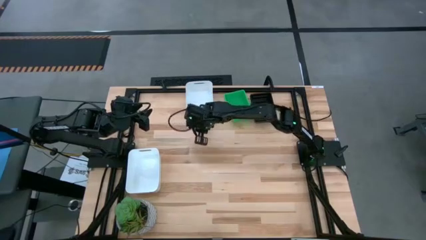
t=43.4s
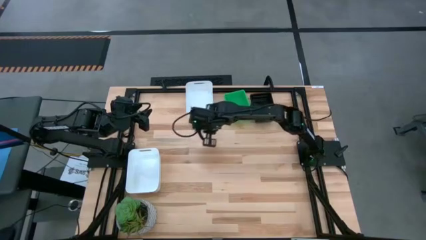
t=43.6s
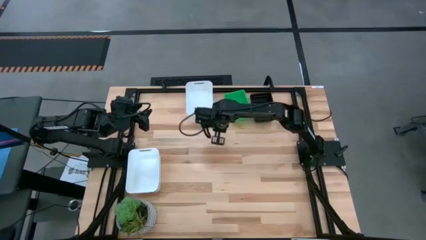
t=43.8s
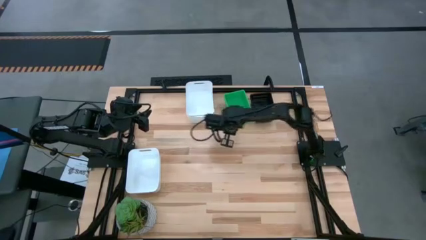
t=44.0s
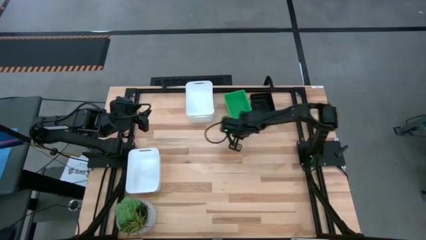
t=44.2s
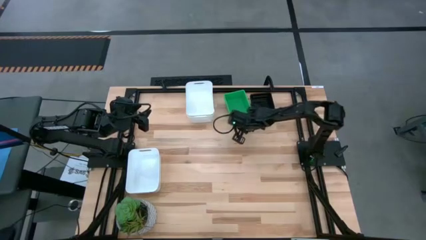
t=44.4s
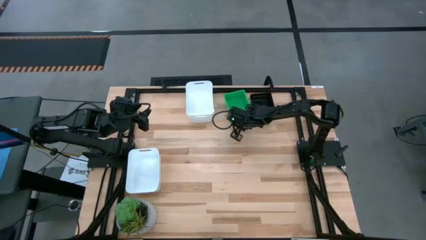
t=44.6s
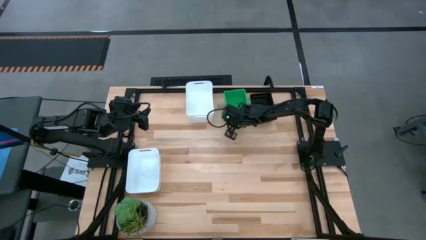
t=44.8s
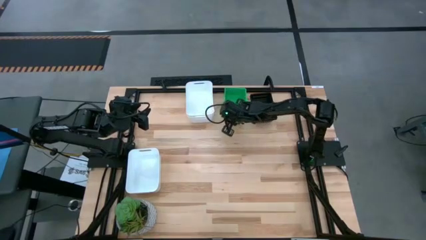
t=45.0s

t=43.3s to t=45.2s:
Adjust the green stacked bins

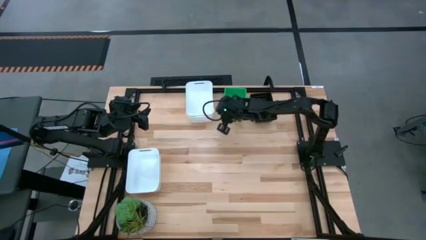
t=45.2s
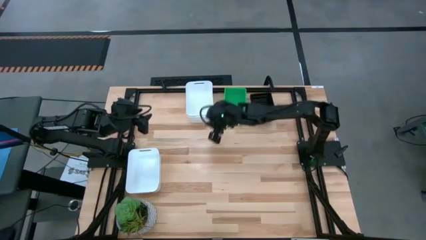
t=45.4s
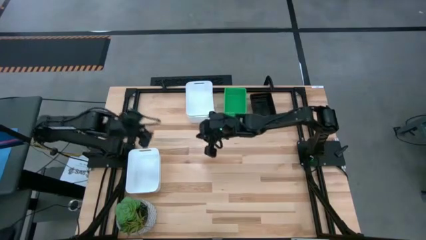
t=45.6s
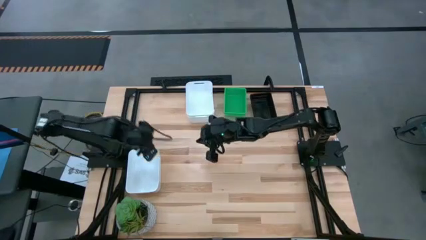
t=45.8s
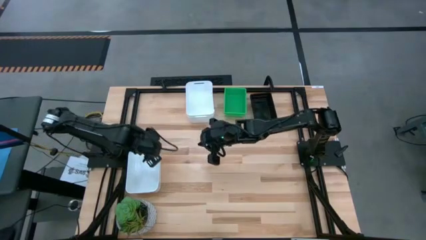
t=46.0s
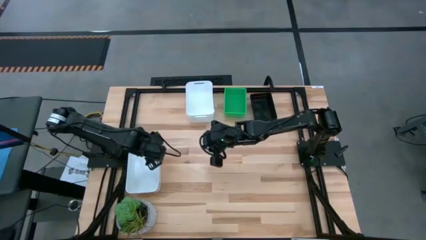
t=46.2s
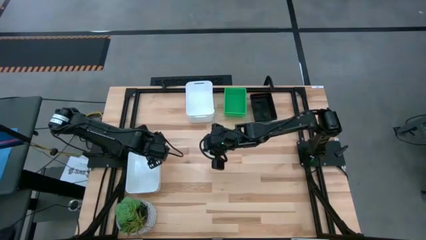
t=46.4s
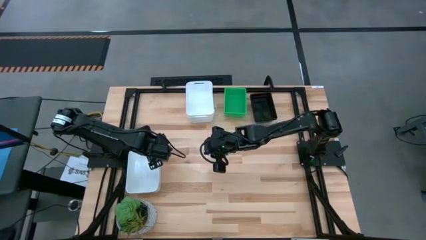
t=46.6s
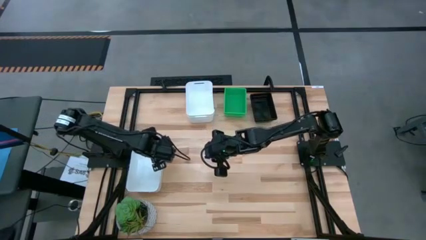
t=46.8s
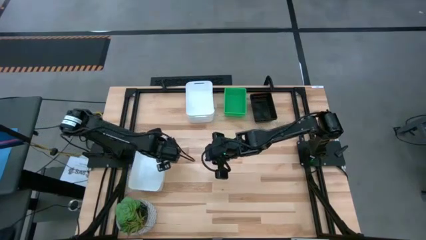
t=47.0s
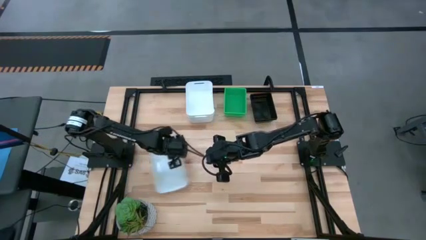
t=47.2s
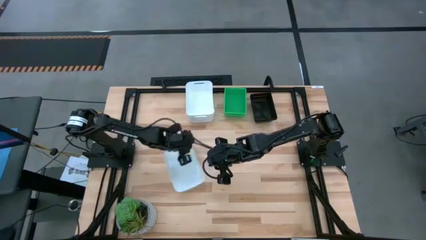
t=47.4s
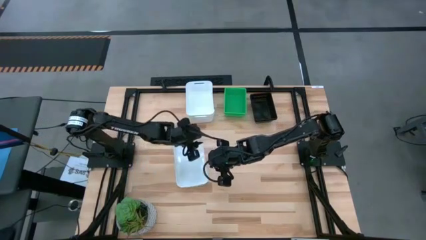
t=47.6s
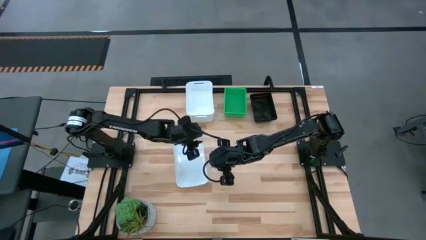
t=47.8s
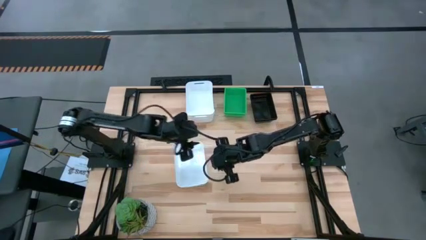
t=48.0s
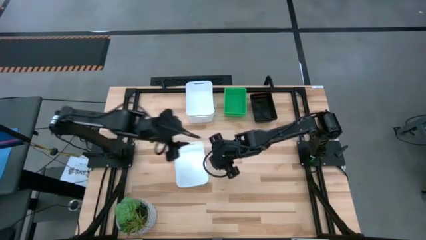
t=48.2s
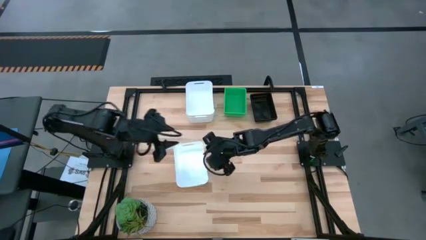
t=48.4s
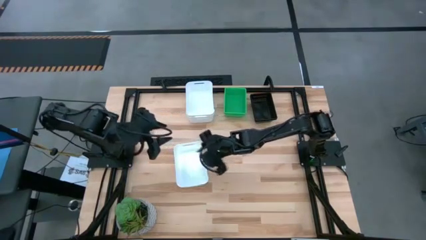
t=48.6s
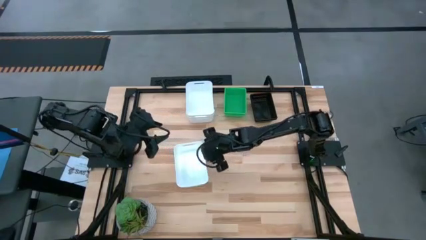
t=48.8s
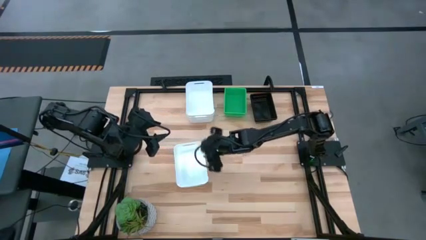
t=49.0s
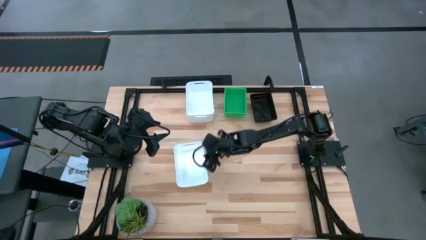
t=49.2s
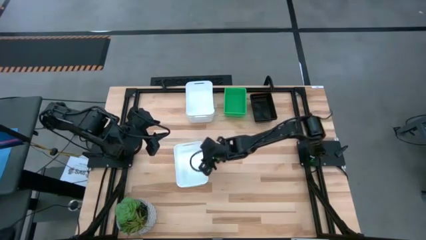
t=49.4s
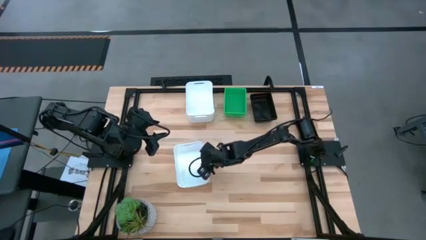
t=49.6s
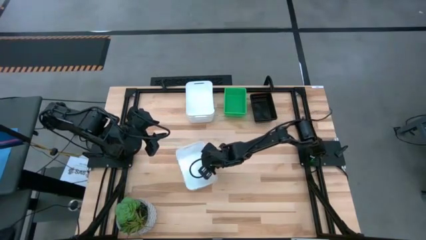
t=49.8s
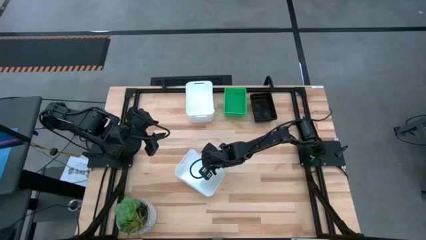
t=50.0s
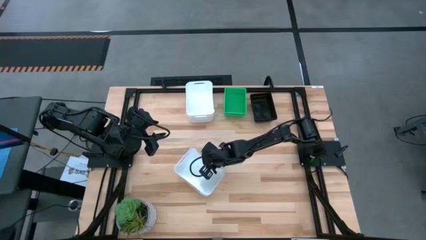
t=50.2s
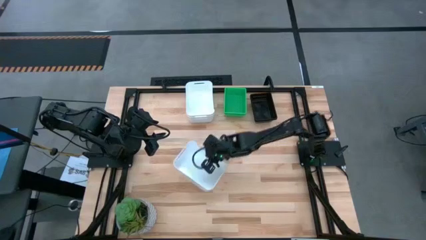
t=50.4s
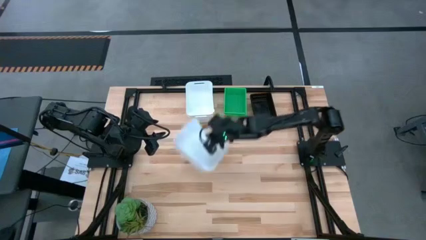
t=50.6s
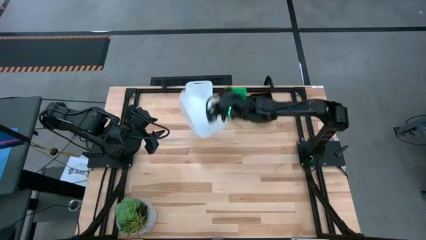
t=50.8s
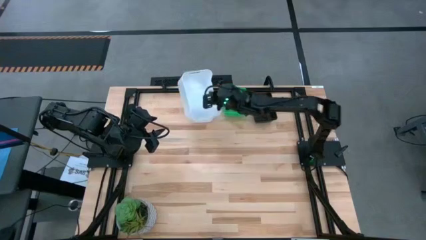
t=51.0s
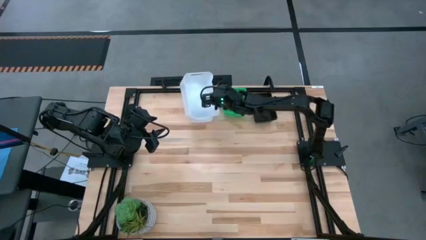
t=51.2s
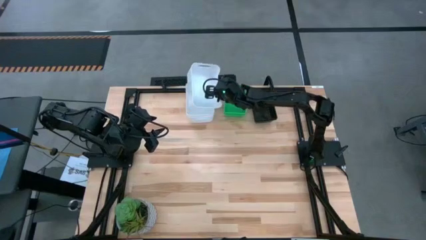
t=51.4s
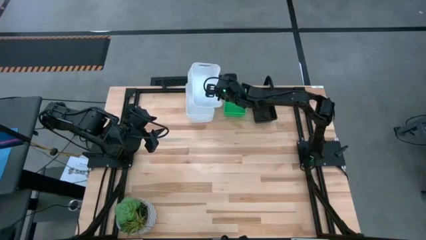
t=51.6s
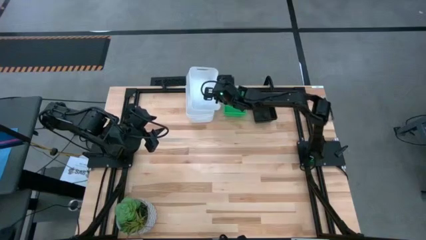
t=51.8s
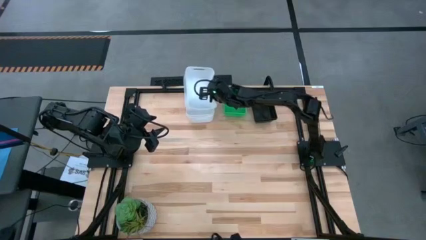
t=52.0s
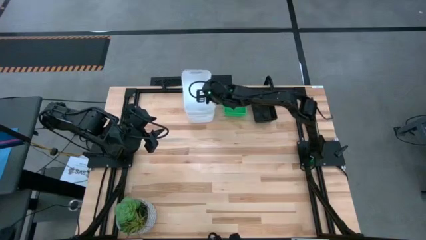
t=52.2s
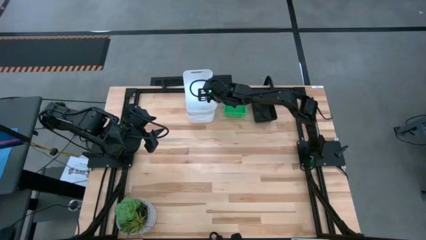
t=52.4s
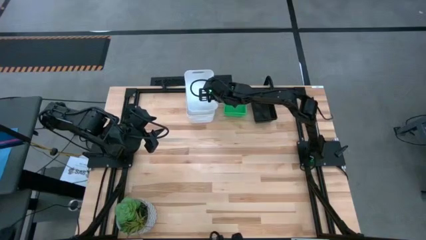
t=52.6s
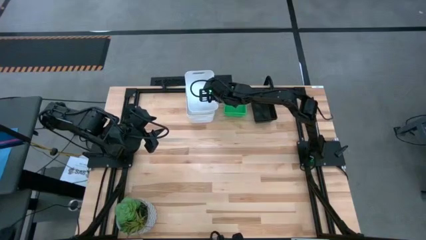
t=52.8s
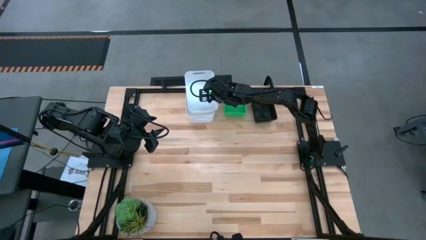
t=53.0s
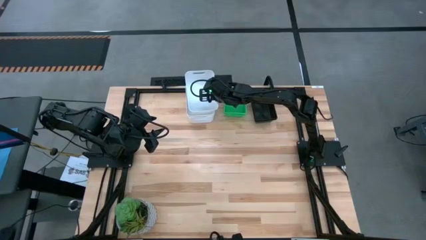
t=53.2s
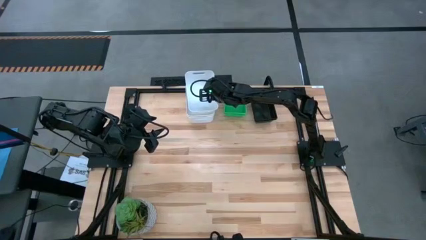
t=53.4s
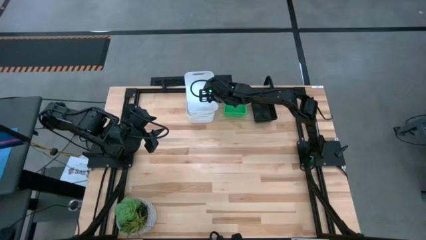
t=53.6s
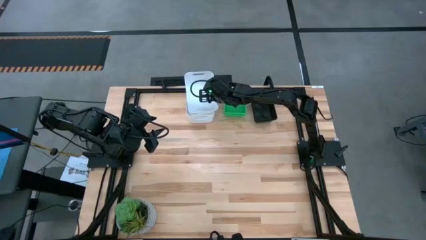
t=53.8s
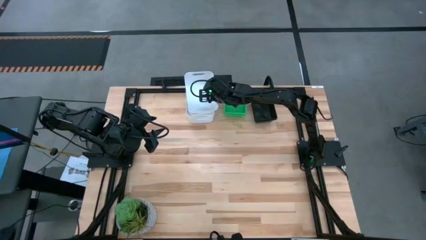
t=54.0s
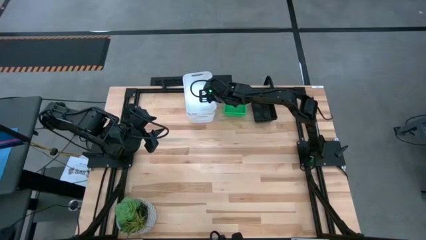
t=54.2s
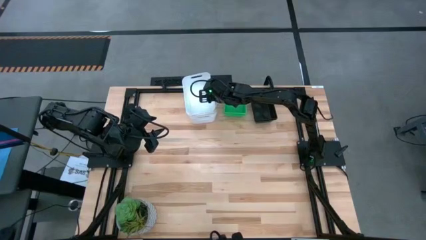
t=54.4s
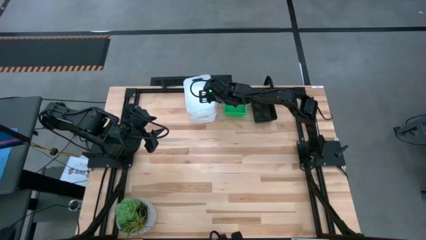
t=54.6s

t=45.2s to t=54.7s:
Stack the bottom white bin into the top white bin
